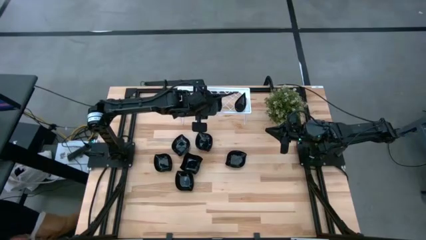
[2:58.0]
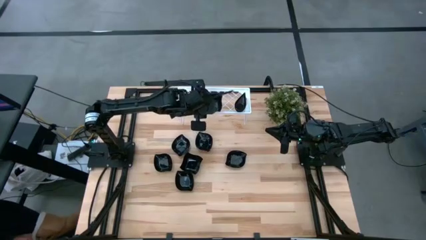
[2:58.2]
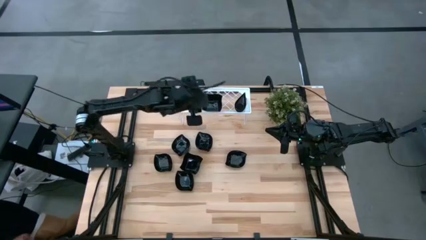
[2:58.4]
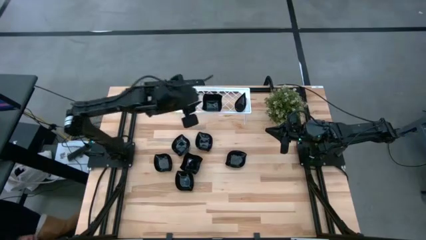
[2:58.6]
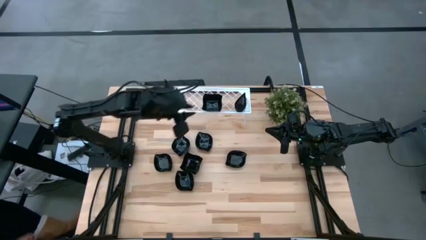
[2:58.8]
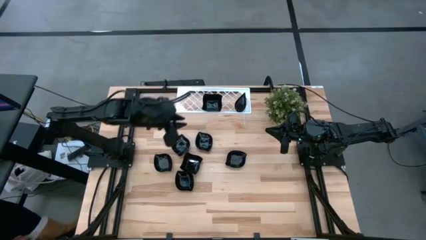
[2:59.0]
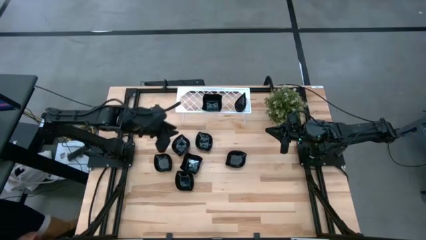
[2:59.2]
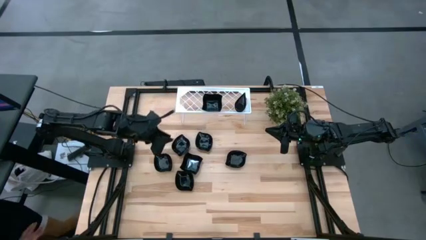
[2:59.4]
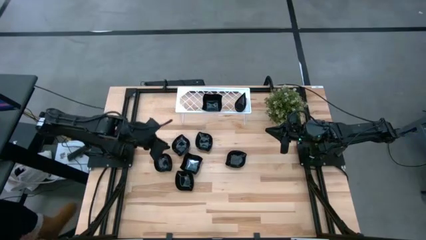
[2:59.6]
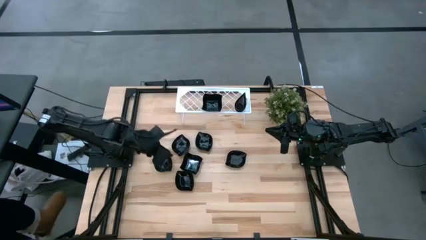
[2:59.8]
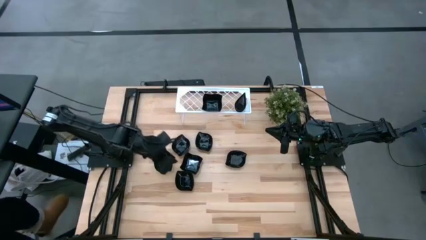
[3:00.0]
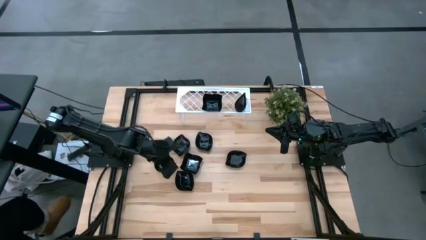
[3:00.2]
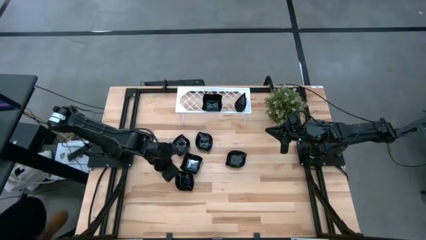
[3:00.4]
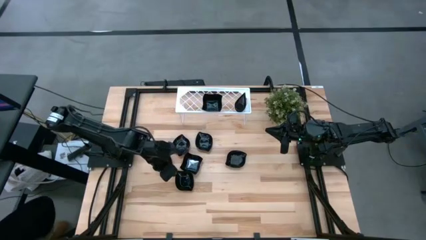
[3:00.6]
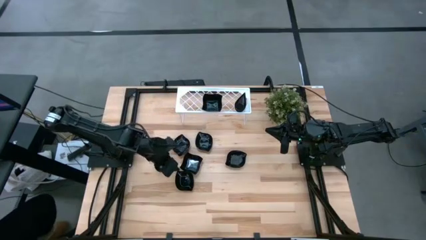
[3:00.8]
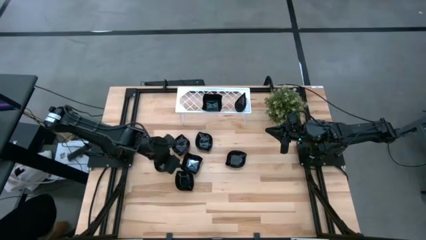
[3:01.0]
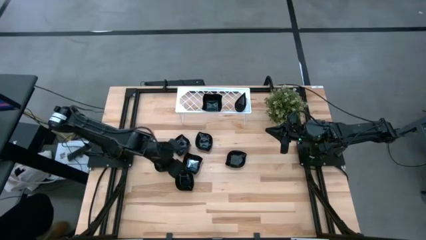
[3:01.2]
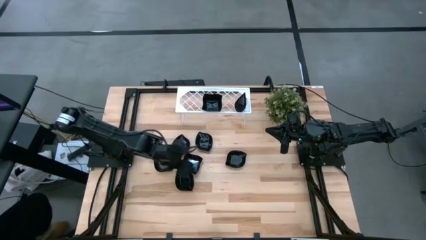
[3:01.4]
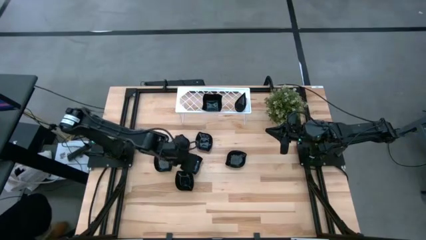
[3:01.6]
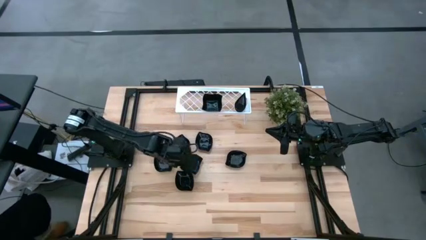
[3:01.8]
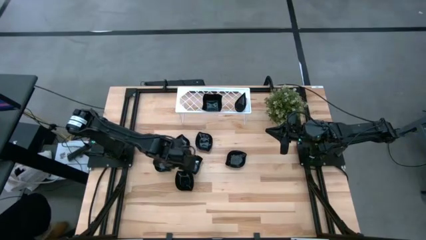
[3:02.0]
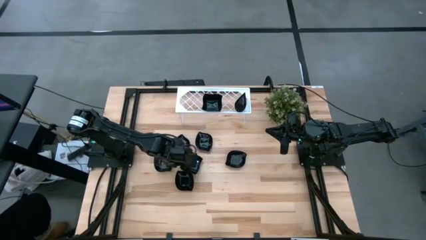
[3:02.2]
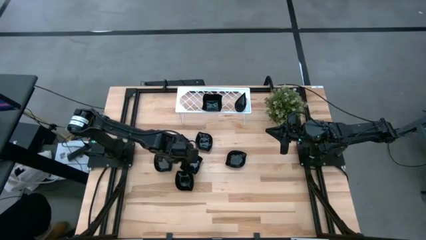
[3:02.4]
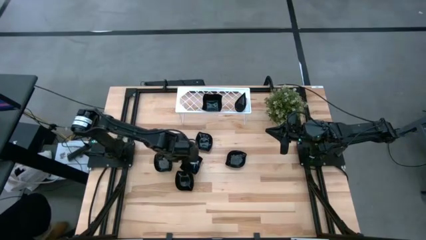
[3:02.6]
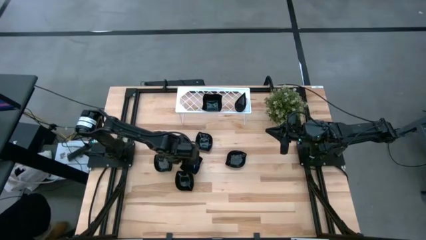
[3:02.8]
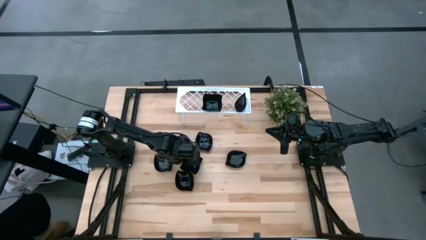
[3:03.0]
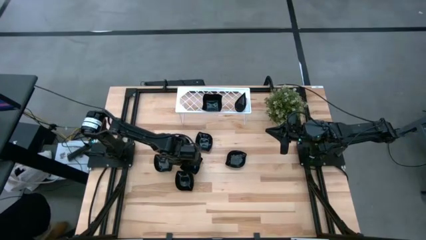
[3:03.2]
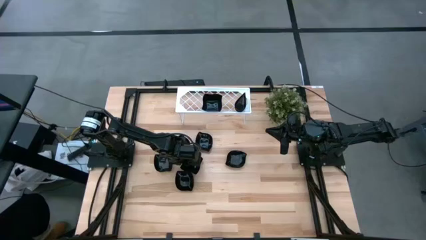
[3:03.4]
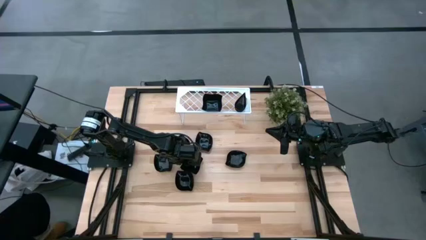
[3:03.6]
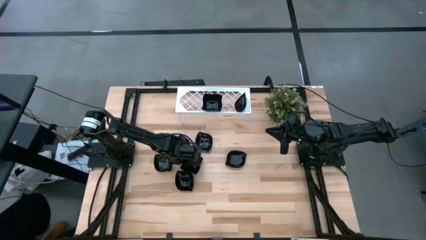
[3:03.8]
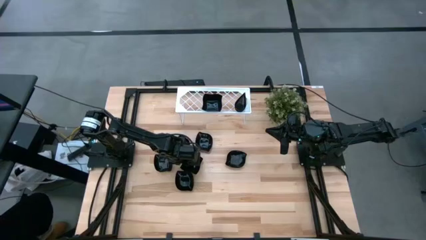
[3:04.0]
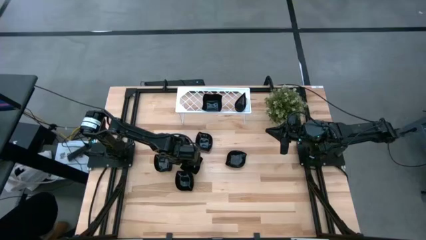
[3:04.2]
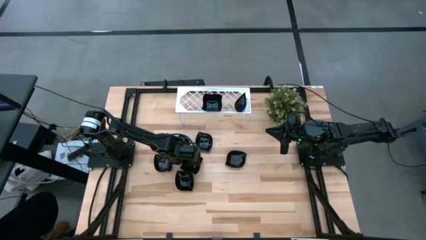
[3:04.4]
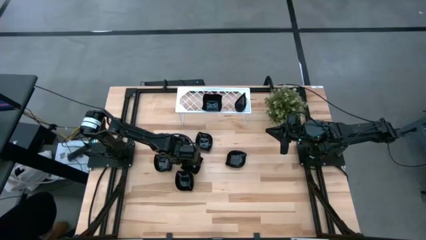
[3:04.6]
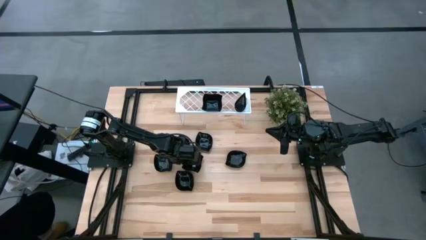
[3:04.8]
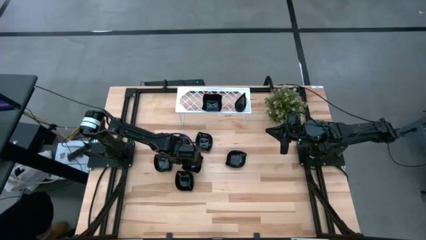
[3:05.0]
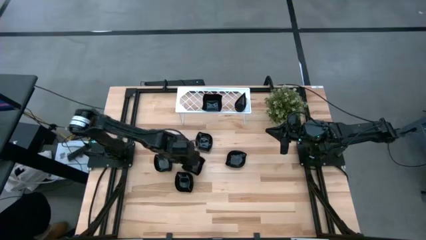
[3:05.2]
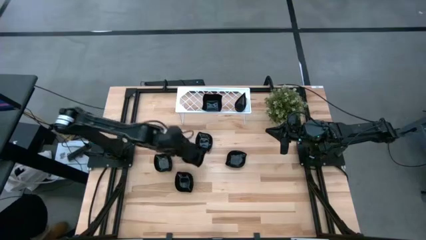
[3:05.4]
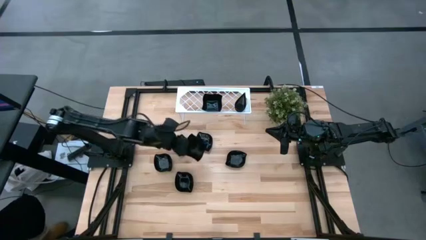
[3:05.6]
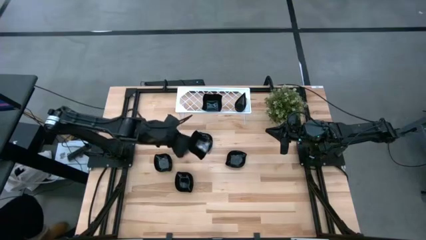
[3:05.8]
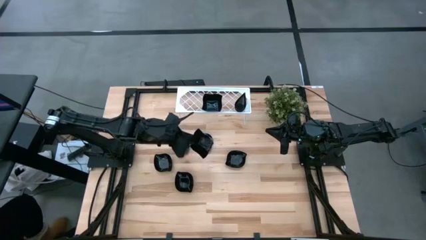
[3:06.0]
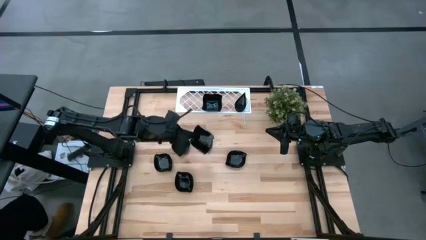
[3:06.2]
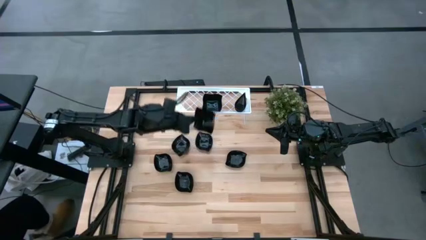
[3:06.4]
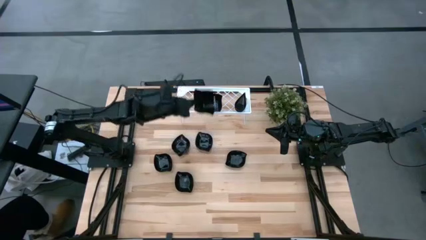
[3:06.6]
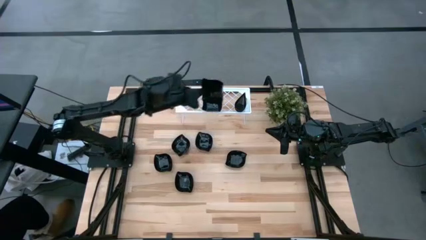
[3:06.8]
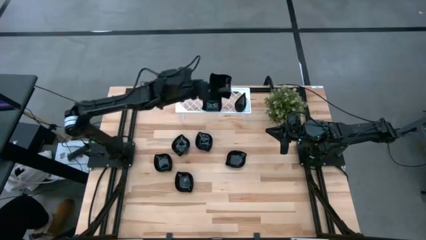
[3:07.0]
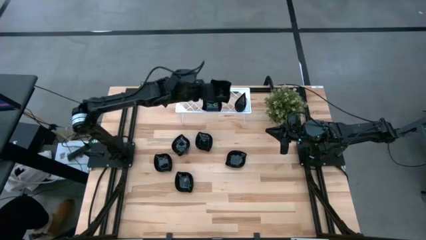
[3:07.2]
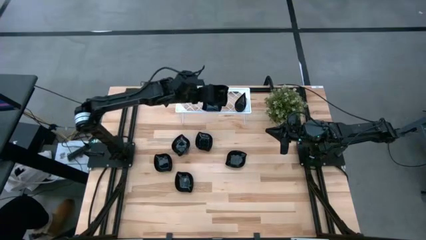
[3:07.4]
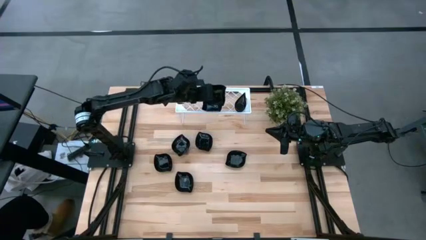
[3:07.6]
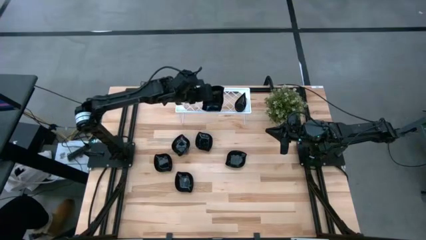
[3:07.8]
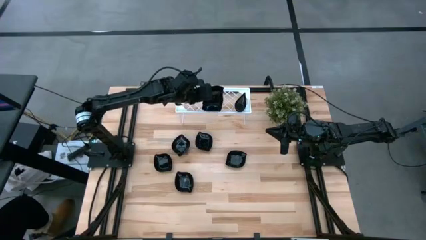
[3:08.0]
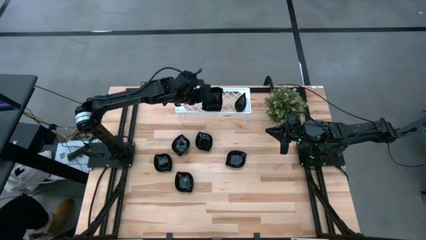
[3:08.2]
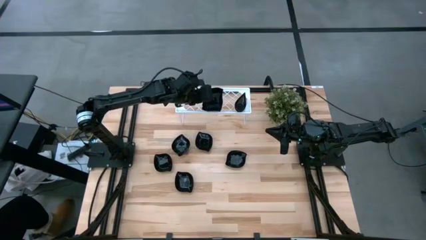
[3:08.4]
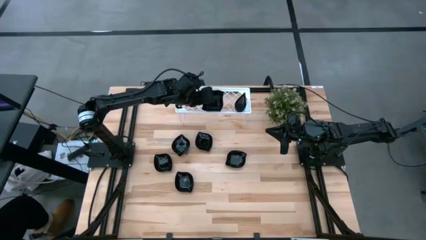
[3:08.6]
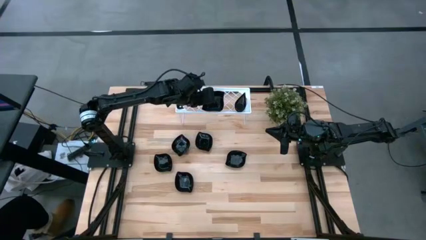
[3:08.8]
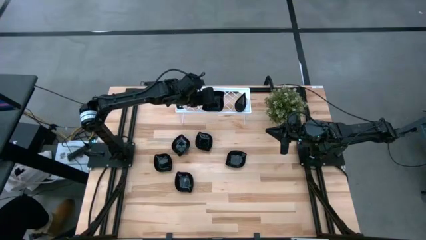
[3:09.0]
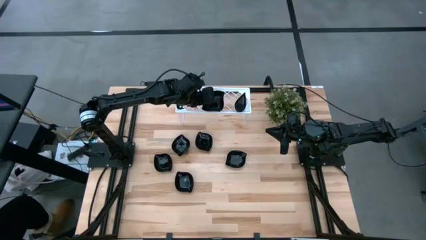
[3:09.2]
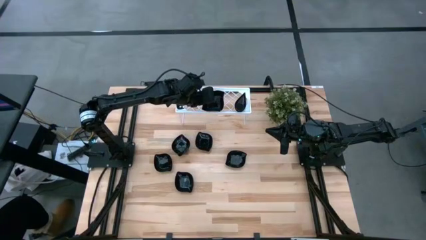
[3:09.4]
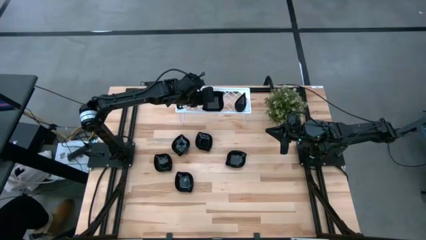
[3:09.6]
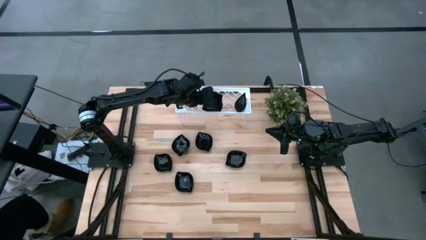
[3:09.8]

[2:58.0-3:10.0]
Task: Pick & Place Mini shaped plates
Stack the distorted square plate on top of the distorted square plate on the shelf
